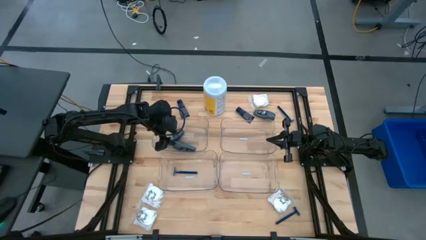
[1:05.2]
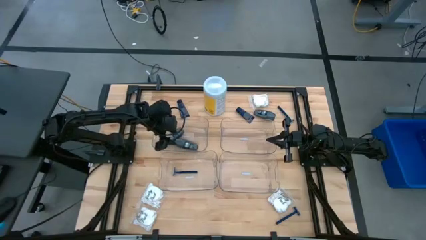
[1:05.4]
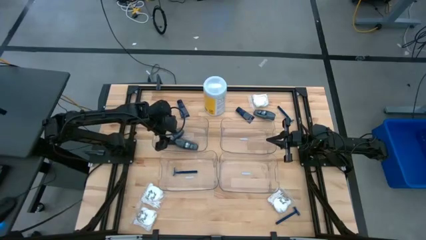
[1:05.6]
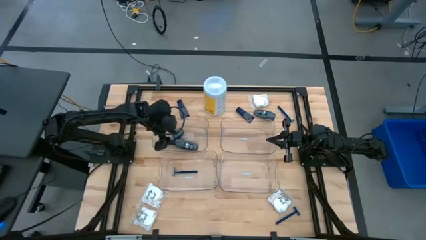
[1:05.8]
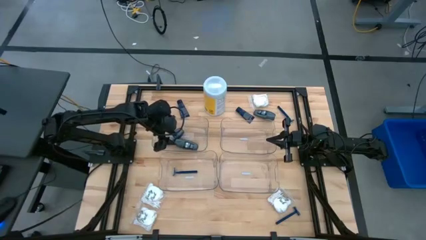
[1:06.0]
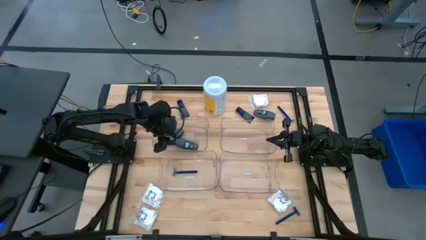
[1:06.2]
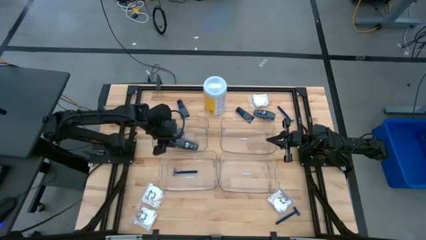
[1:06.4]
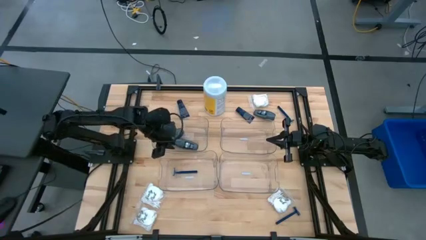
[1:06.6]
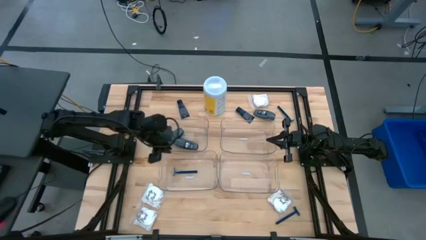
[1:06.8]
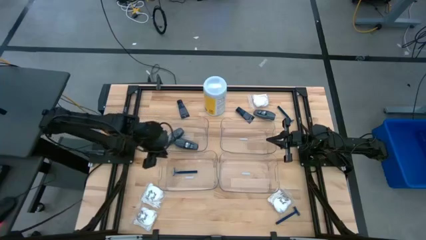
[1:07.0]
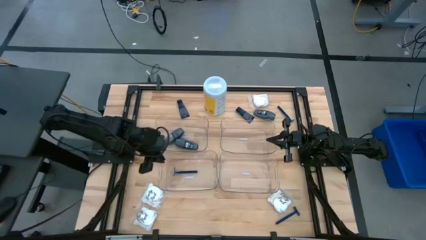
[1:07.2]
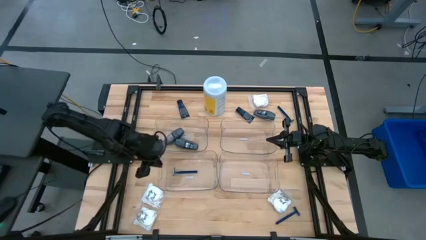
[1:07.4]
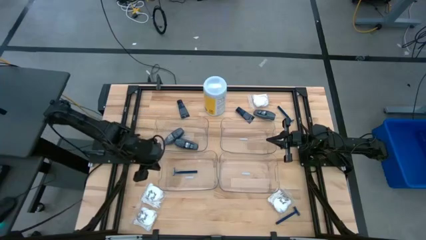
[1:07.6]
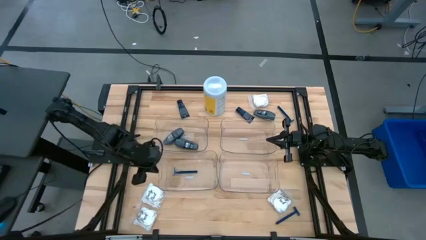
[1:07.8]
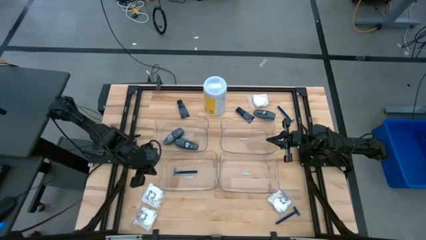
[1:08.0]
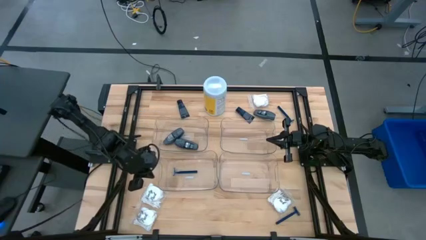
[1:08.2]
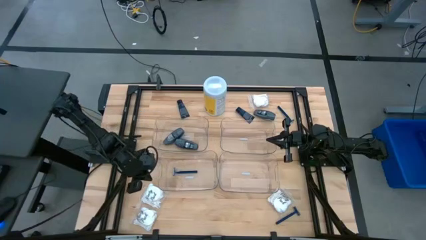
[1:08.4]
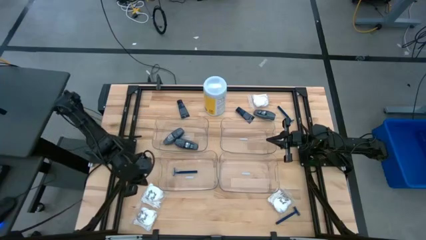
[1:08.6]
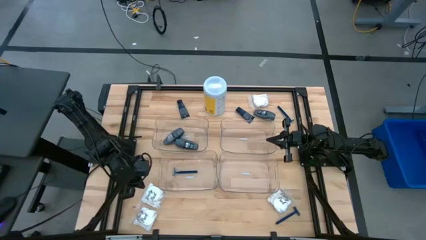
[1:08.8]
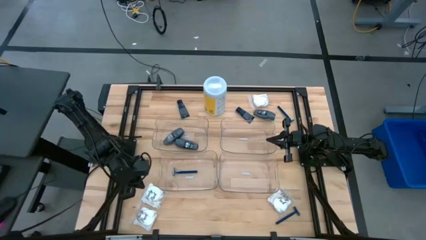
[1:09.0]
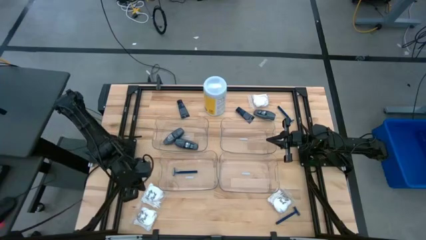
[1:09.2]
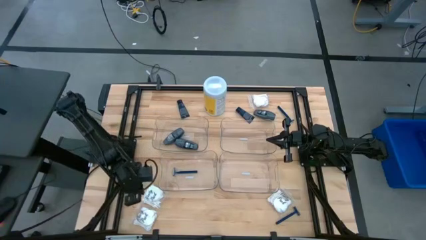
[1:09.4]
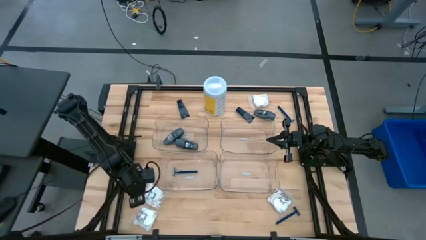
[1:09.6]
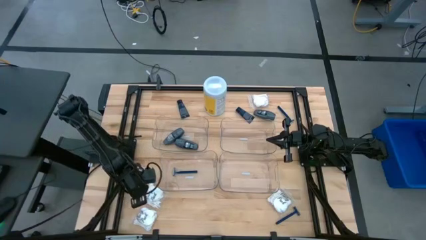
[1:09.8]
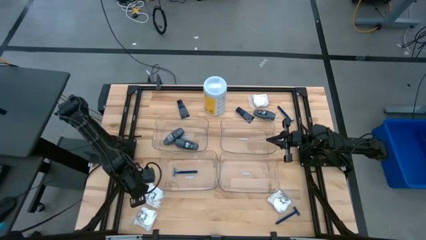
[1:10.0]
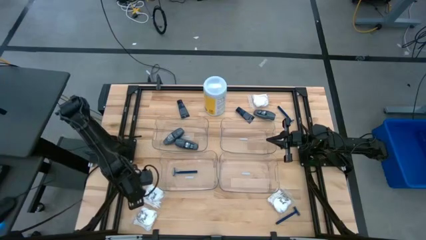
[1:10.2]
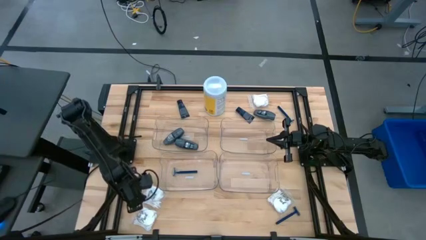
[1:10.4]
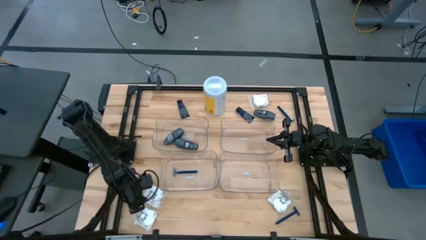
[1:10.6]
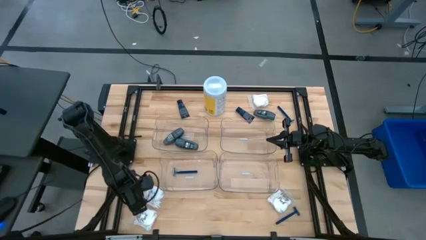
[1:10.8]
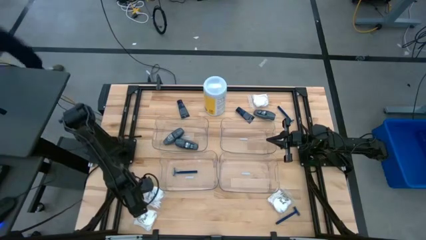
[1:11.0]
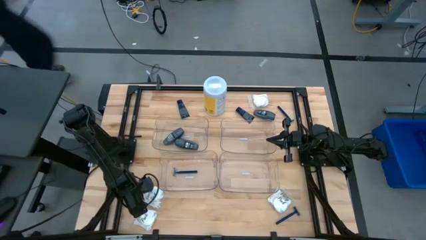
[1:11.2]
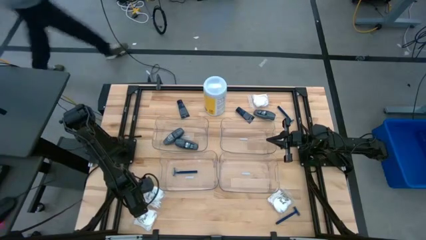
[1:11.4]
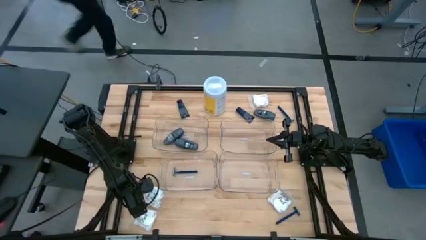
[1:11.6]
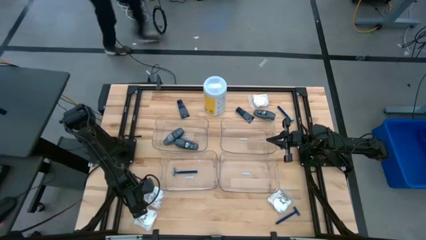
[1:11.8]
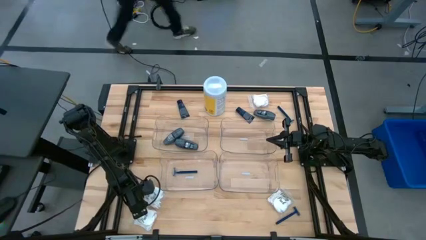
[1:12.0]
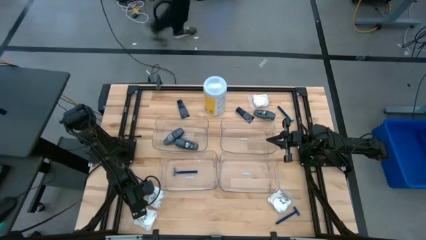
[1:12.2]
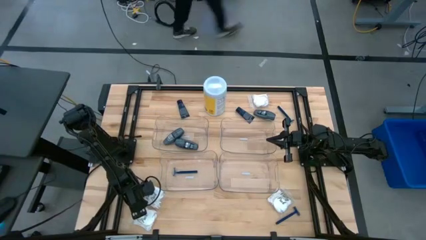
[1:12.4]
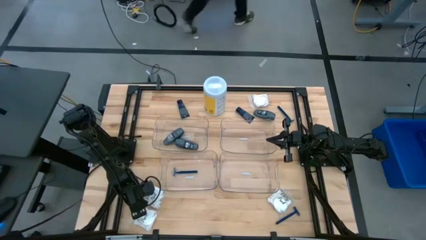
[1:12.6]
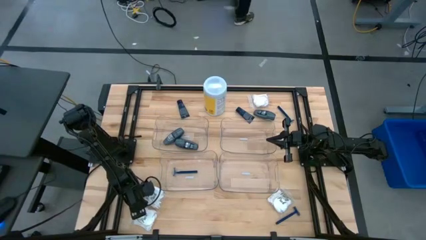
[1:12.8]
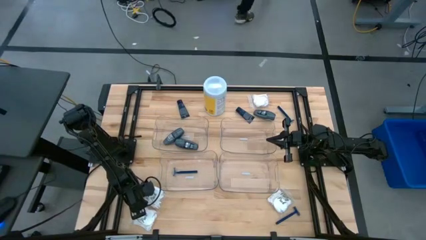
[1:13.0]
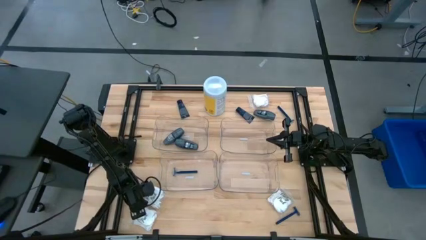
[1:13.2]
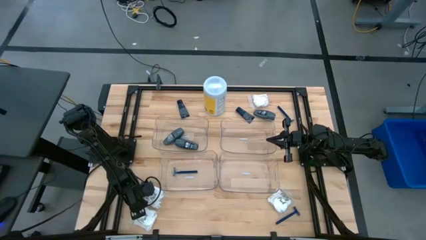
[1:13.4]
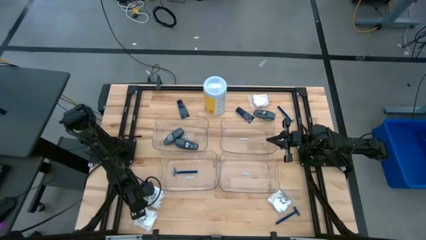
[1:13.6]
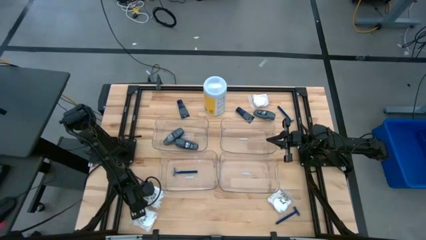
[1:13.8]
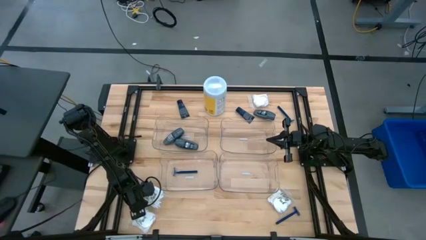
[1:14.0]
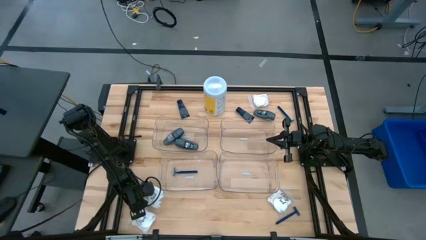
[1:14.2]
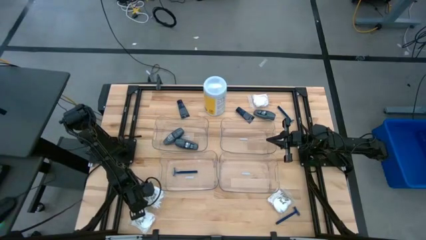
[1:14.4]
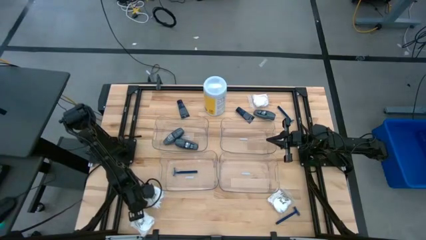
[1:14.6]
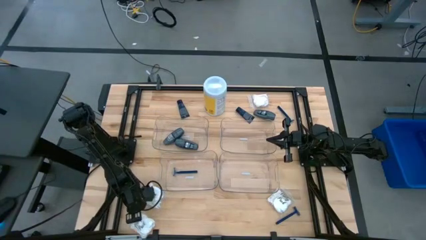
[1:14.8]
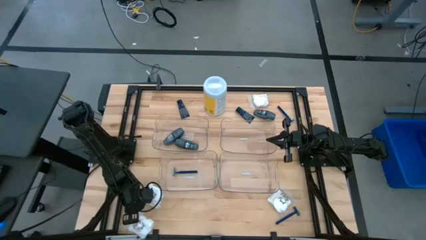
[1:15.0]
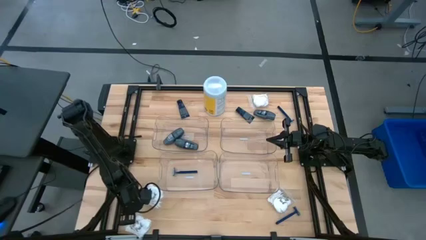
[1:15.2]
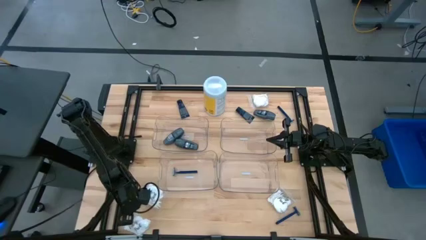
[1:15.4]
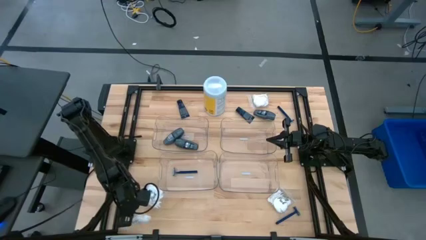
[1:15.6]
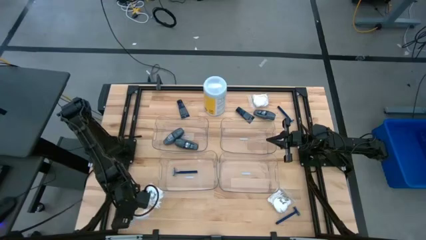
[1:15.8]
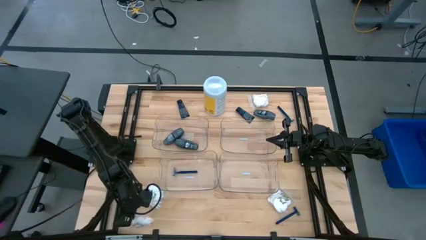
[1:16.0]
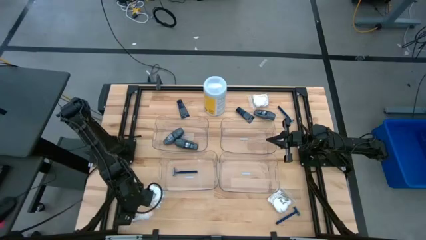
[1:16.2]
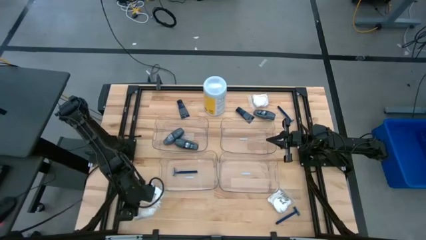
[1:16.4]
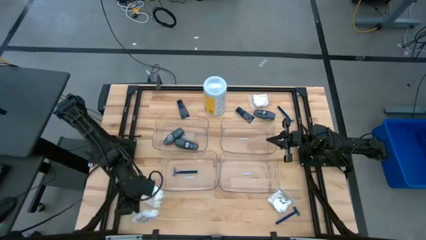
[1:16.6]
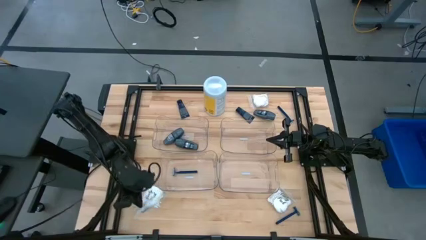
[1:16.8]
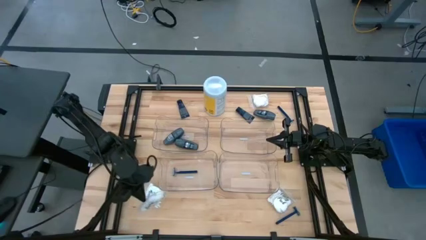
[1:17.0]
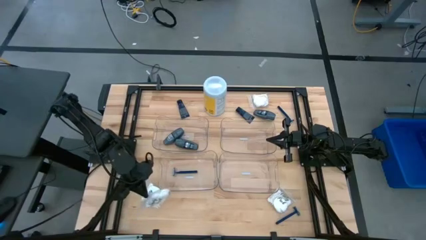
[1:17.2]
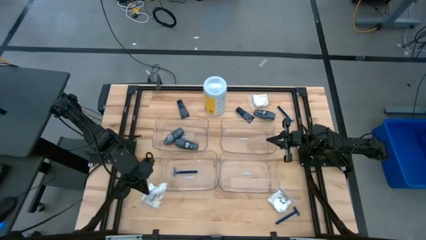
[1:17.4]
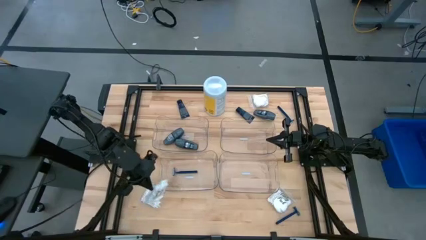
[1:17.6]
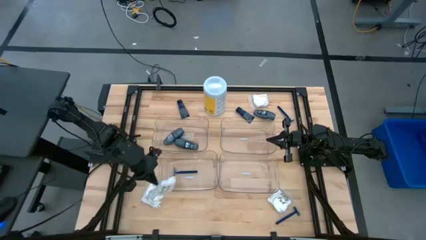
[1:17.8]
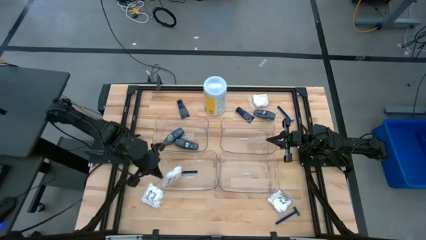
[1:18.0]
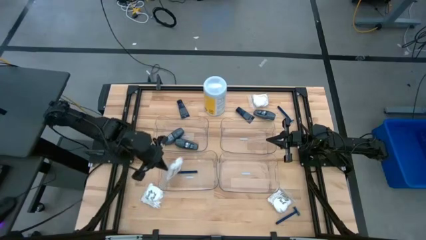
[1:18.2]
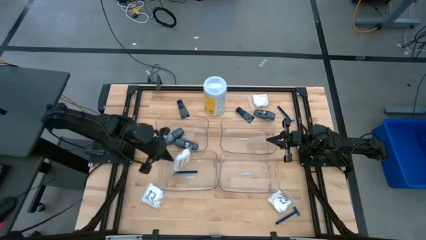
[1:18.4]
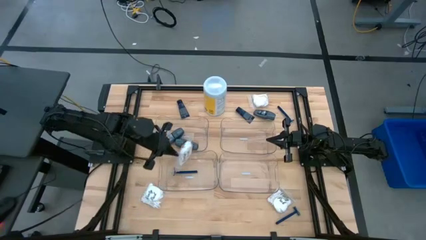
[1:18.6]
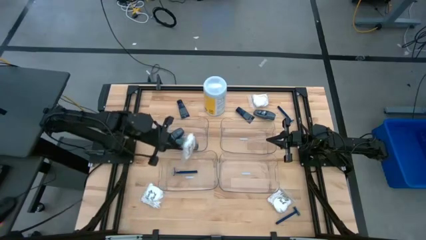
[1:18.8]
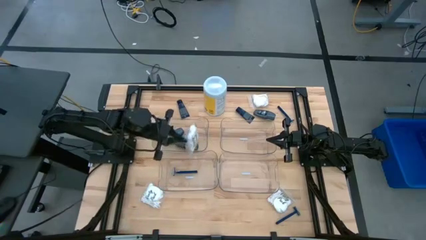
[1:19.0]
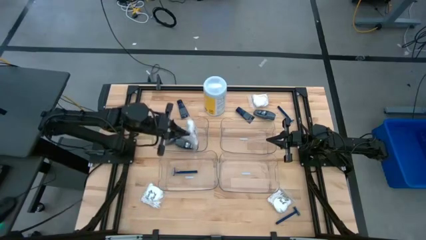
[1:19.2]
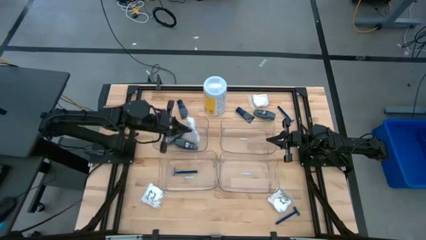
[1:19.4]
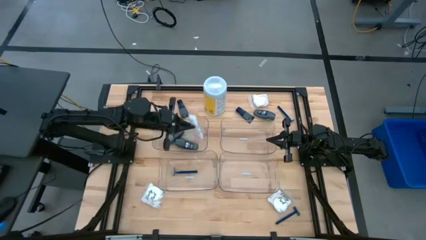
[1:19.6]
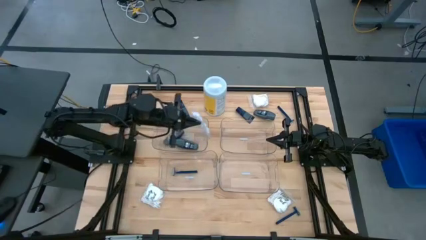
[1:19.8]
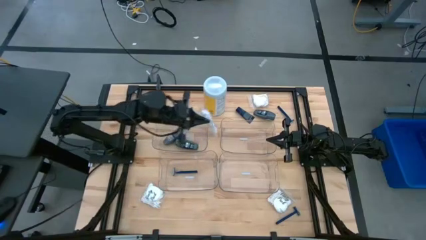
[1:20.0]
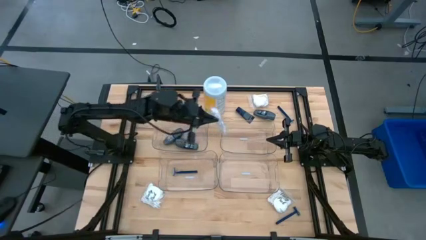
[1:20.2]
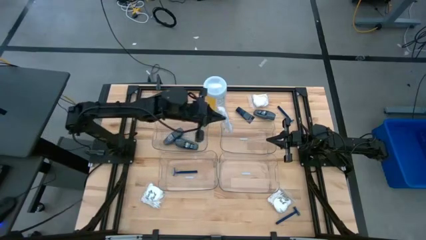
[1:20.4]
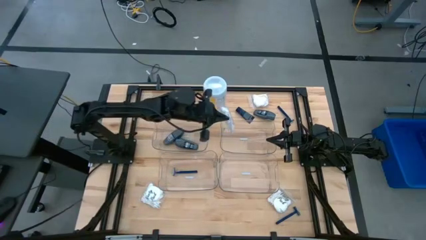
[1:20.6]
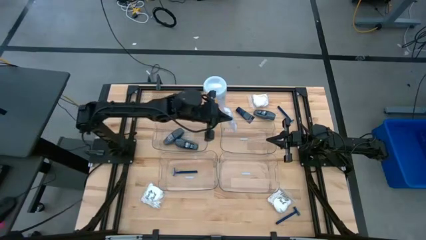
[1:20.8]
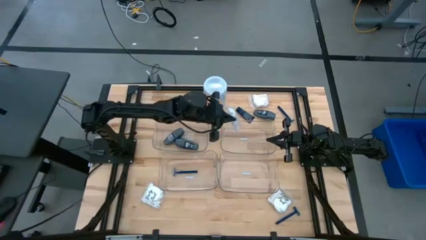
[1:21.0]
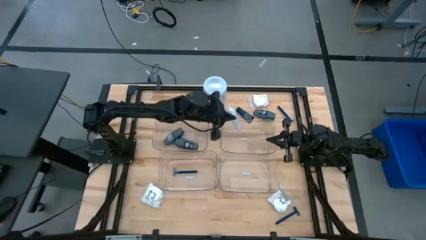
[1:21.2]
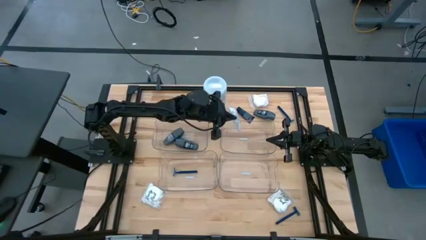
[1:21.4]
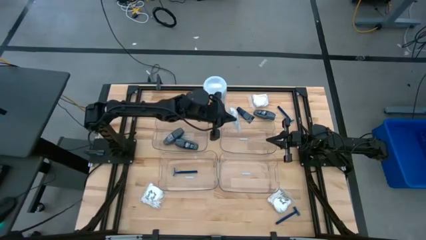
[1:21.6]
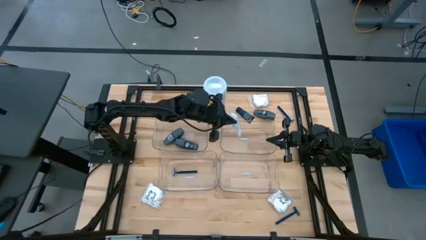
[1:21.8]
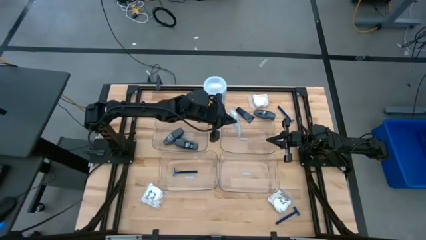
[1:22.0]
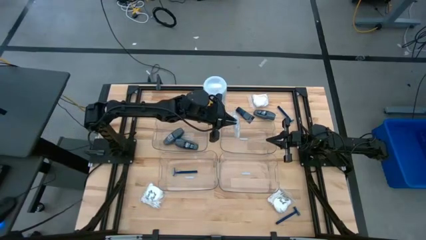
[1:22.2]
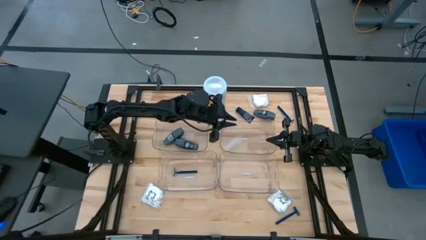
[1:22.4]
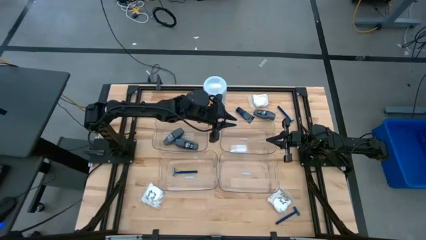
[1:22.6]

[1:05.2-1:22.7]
Task: Pick & Place Travel size toiletries
Put the transparent vanity pack into the top right transparent bin
